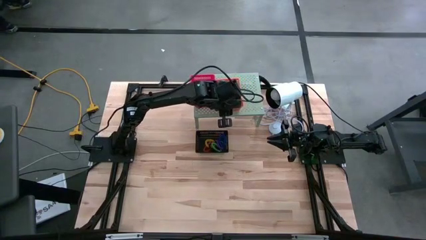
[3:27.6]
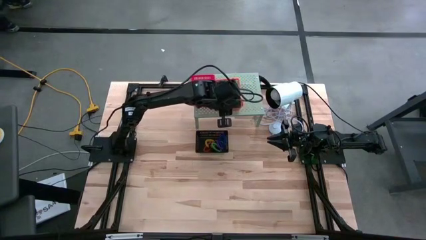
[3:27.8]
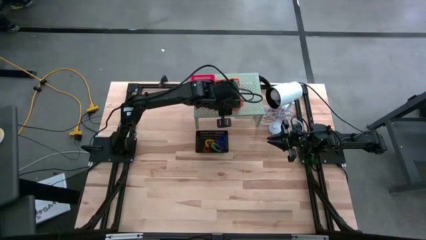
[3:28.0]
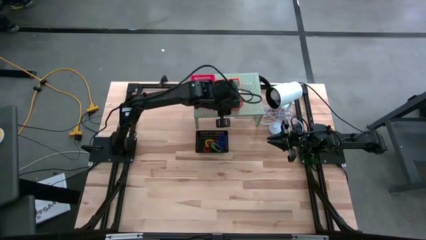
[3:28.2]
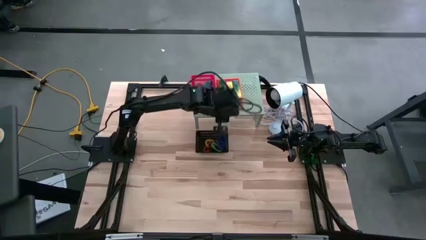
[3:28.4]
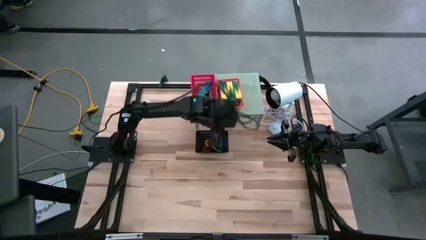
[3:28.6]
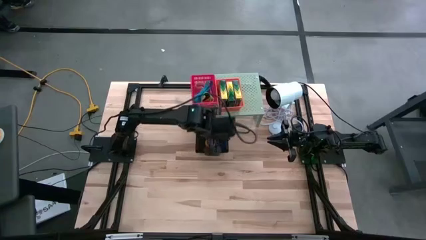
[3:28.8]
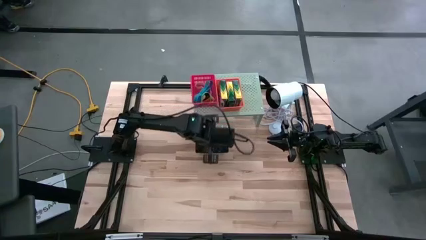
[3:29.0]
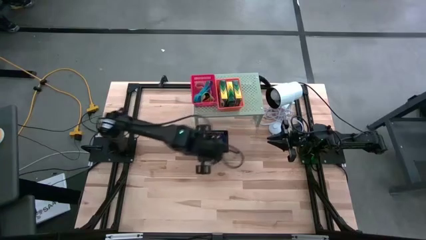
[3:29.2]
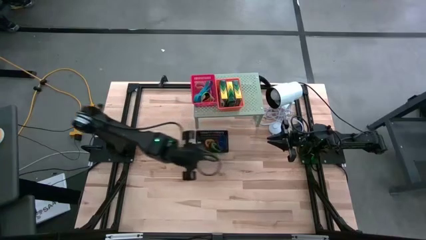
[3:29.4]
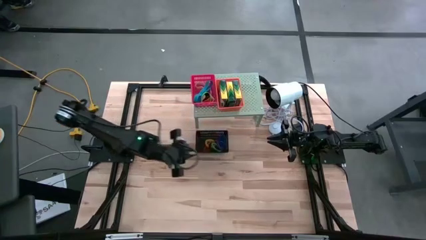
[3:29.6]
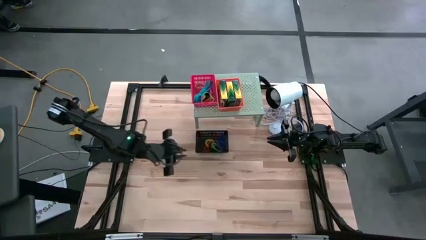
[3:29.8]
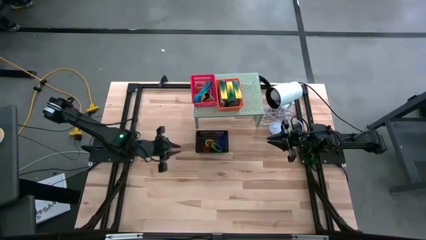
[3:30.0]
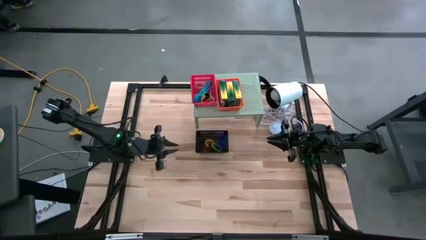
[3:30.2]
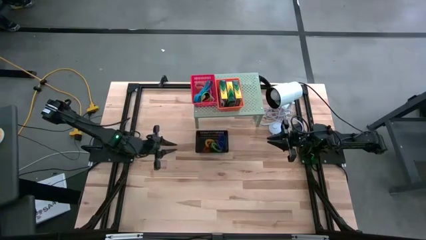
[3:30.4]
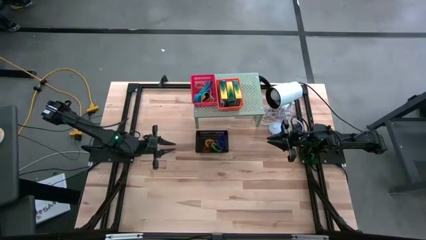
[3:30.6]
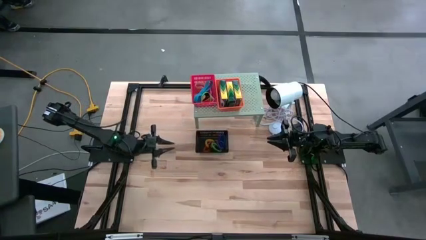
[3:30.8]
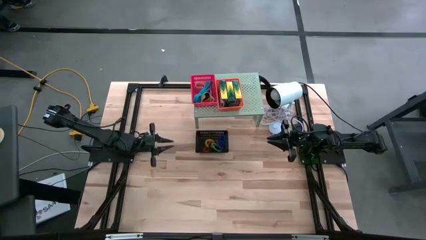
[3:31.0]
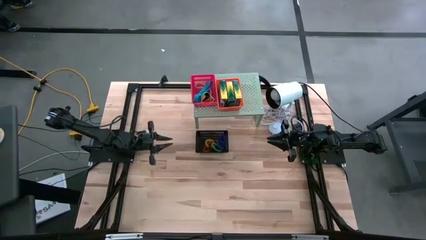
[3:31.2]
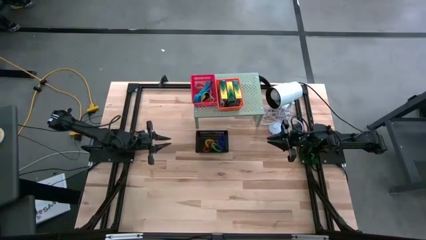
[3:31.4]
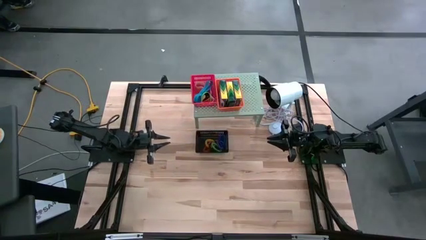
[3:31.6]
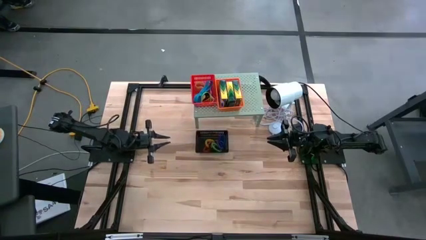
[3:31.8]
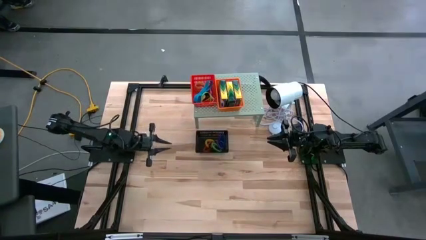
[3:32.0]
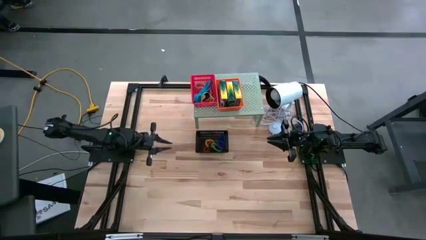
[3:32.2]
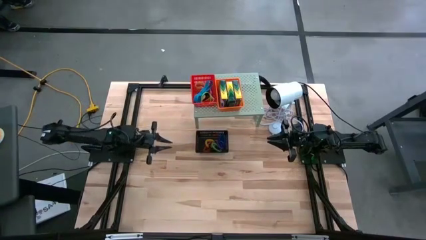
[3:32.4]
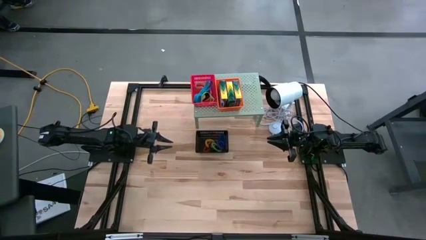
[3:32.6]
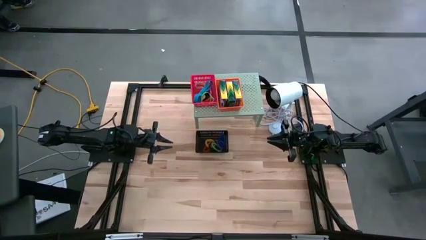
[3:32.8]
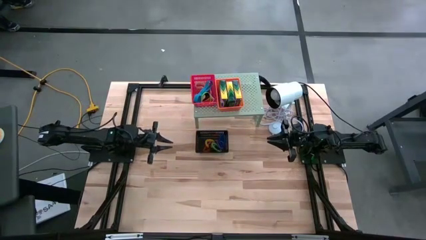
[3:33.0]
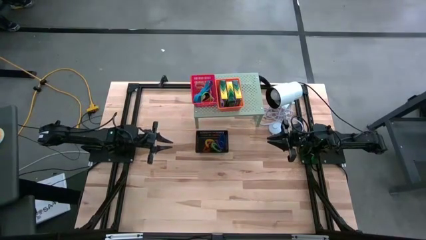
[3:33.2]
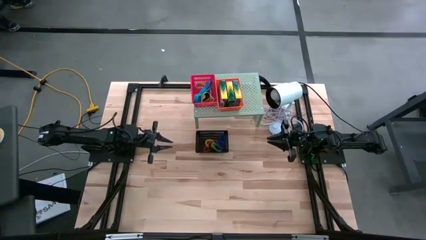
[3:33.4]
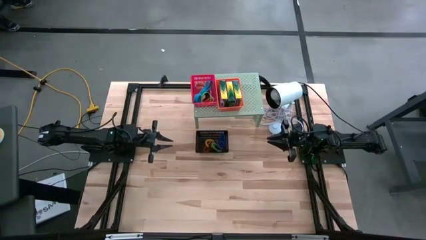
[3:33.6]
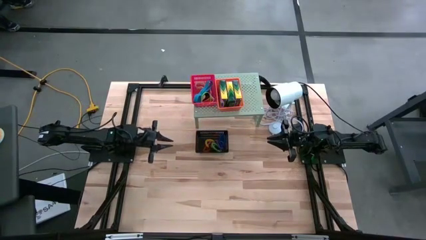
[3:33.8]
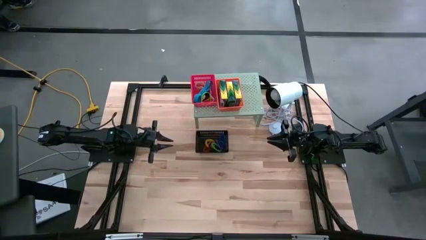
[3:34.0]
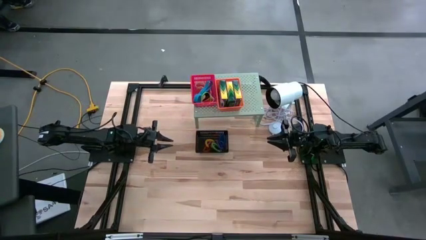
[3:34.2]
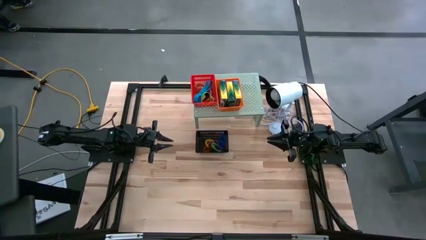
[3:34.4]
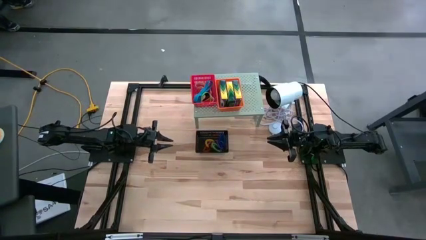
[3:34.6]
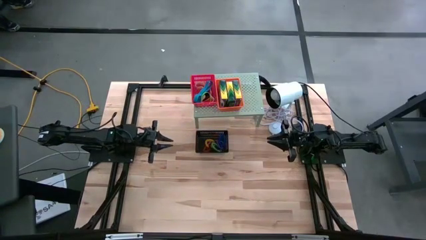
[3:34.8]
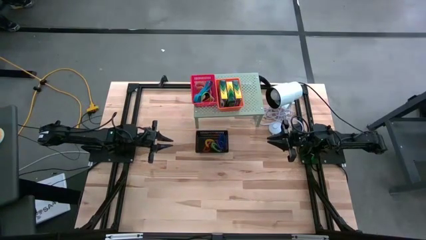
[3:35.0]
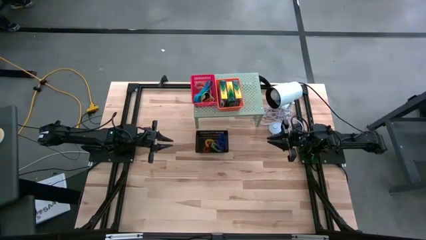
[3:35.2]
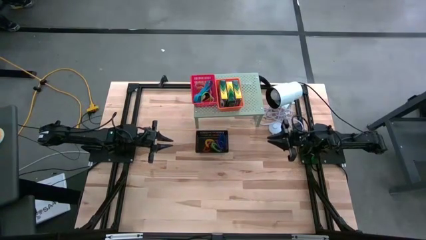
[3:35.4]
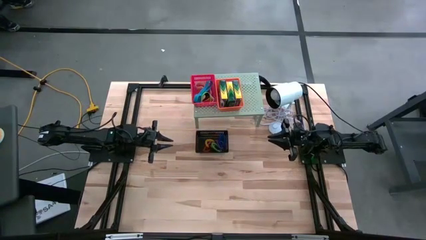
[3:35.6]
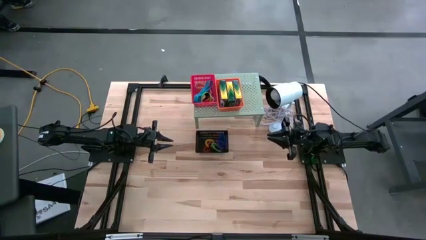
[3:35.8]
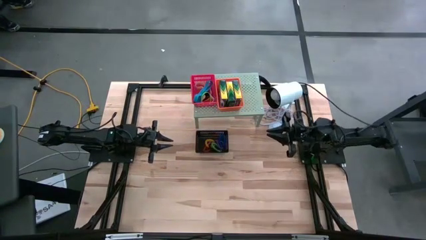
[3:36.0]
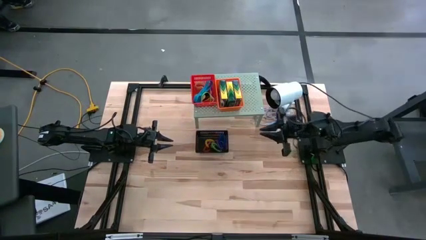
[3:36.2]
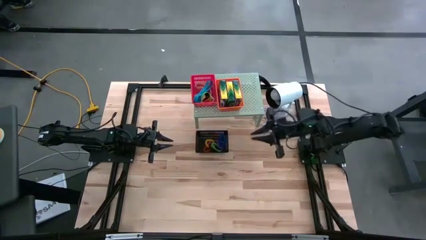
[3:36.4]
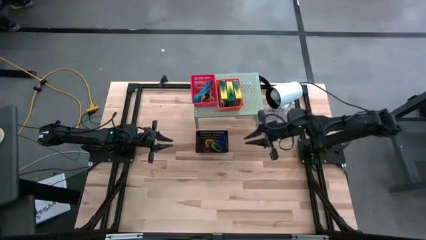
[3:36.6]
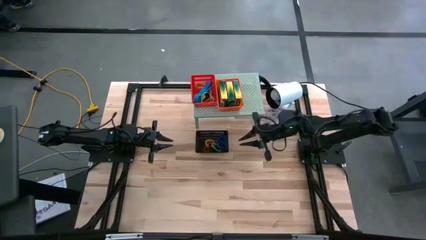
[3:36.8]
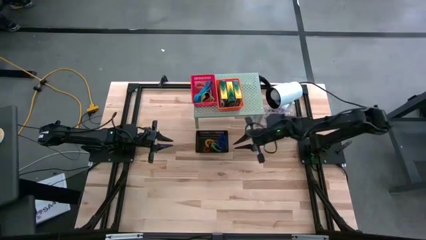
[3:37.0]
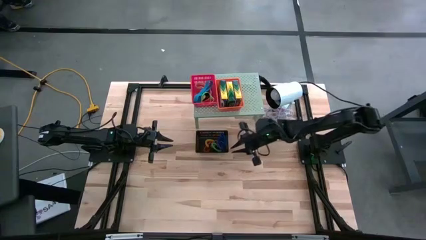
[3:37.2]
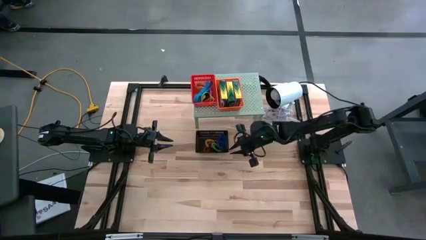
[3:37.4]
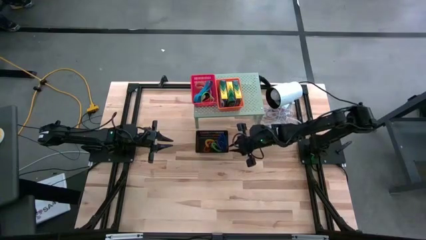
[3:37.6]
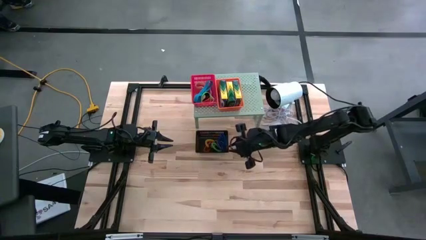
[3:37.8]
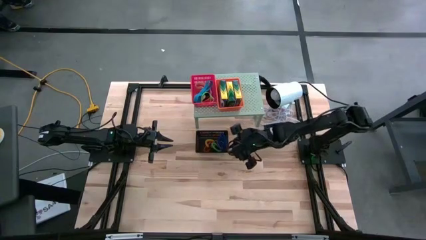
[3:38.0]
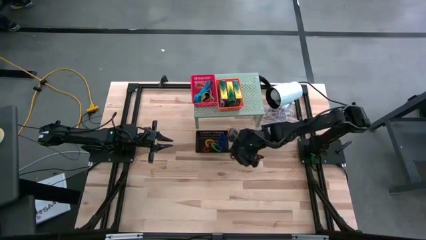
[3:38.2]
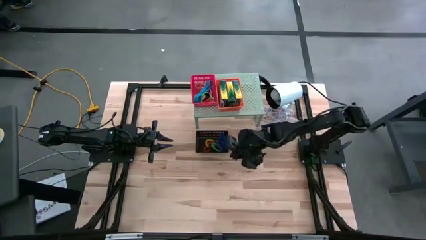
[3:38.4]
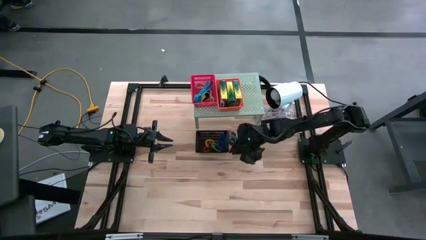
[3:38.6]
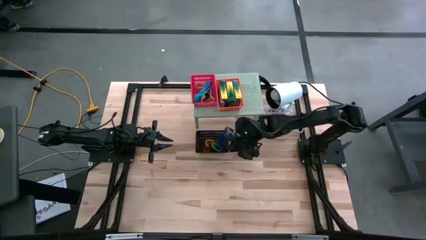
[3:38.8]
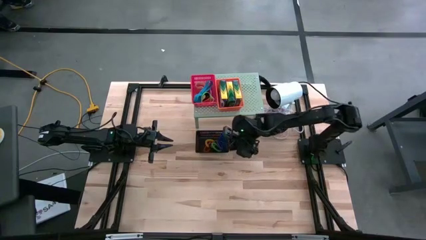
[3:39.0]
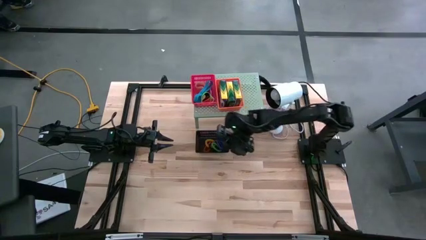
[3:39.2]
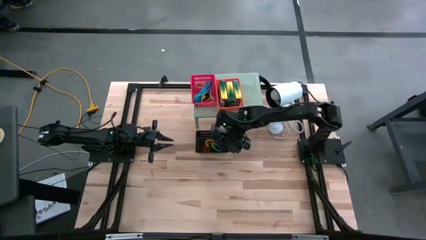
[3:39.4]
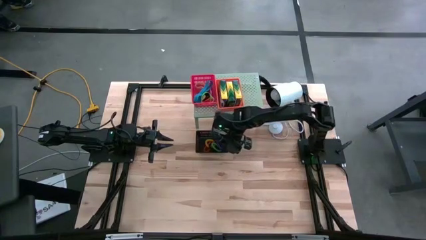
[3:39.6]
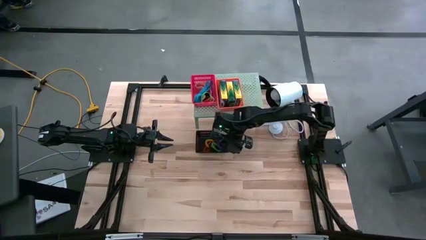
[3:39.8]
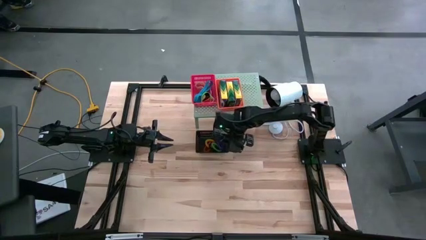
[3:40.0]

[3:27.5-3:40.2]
Task: Pick & Place Office Desk Supplies
Put the black bin with the spring rubber bands on the shelf

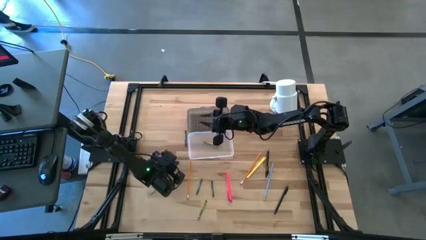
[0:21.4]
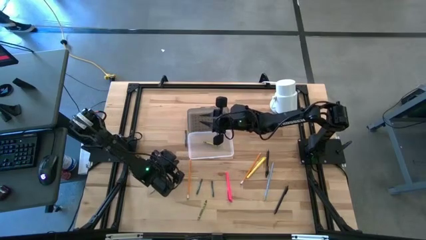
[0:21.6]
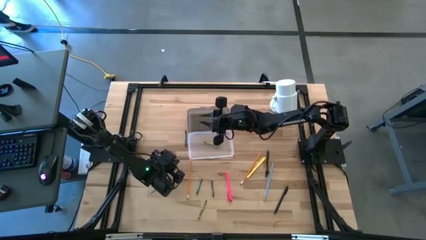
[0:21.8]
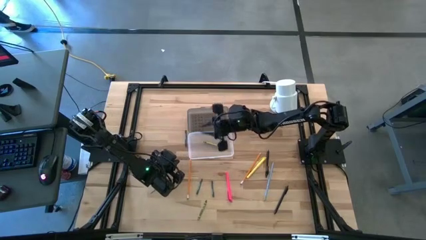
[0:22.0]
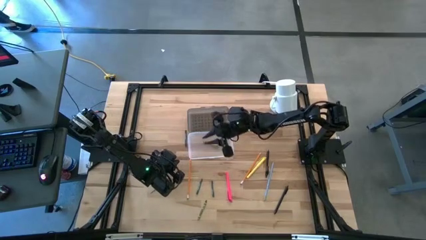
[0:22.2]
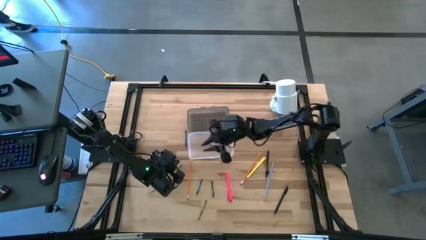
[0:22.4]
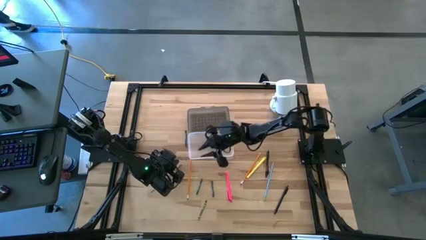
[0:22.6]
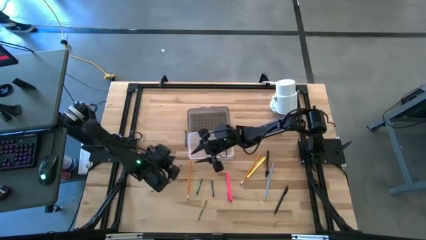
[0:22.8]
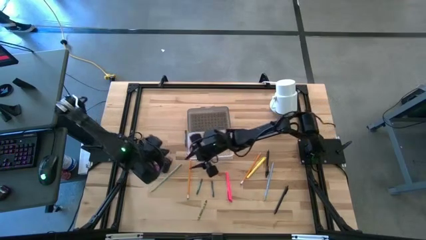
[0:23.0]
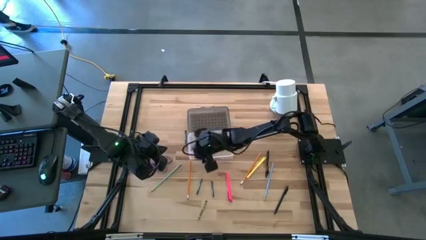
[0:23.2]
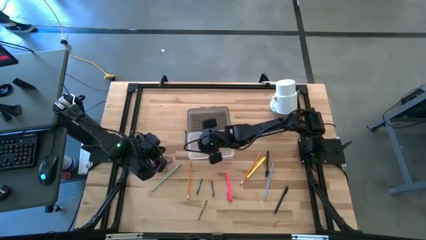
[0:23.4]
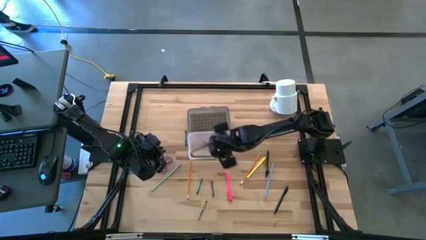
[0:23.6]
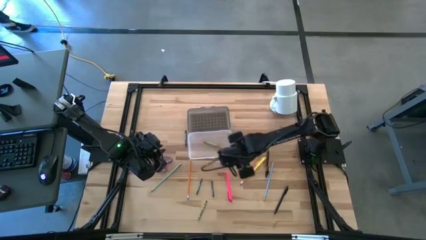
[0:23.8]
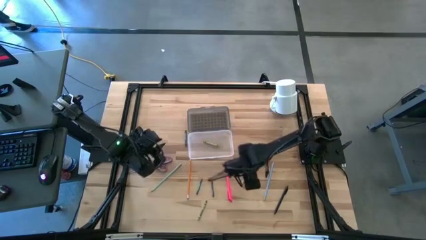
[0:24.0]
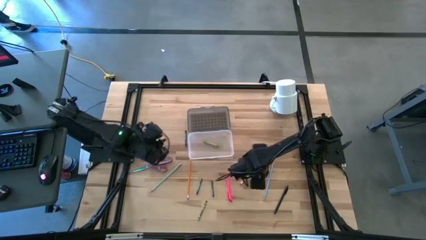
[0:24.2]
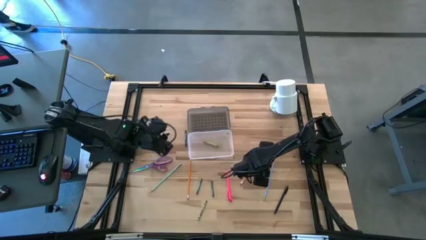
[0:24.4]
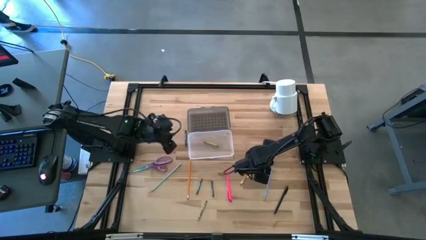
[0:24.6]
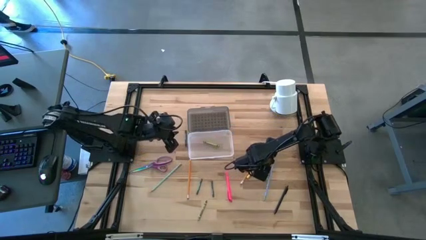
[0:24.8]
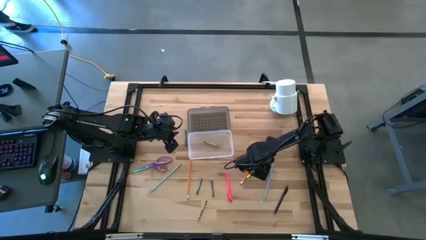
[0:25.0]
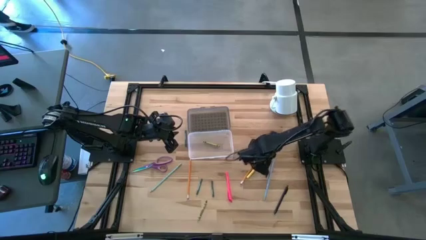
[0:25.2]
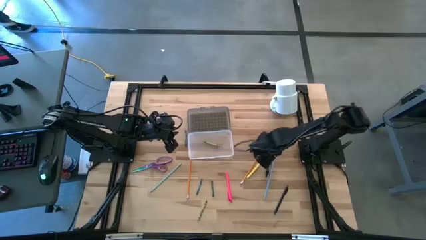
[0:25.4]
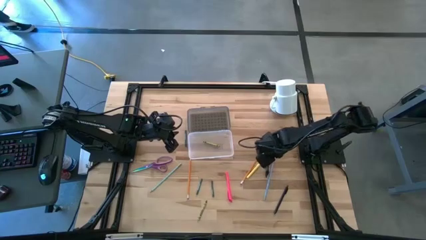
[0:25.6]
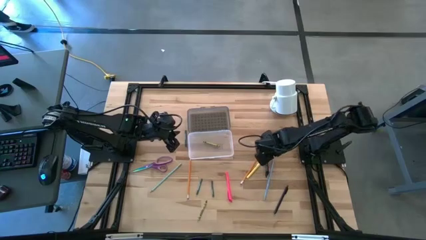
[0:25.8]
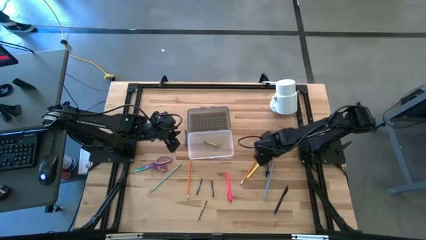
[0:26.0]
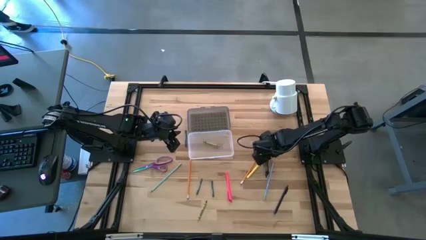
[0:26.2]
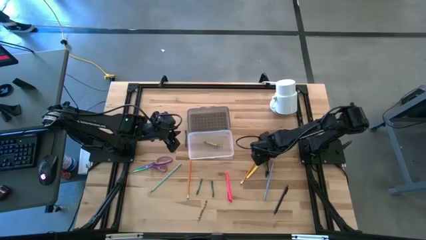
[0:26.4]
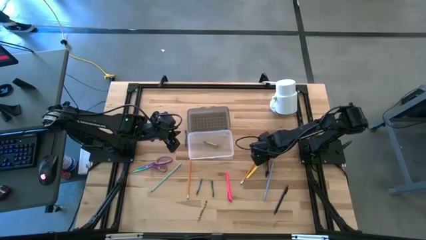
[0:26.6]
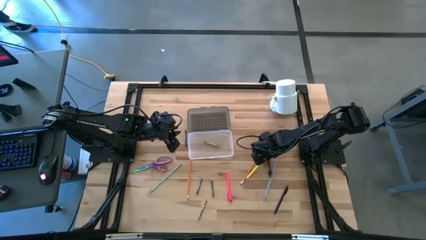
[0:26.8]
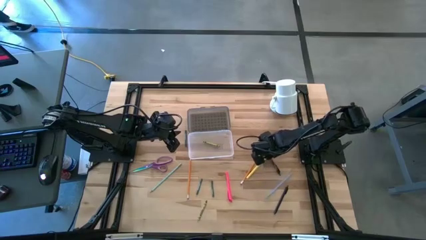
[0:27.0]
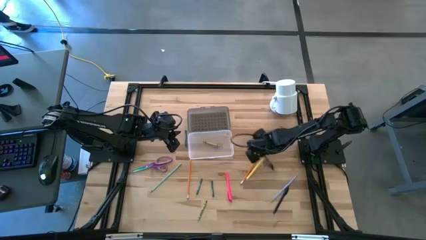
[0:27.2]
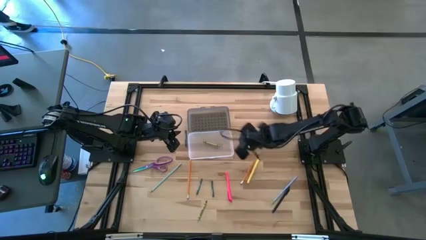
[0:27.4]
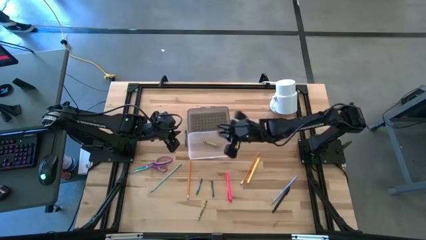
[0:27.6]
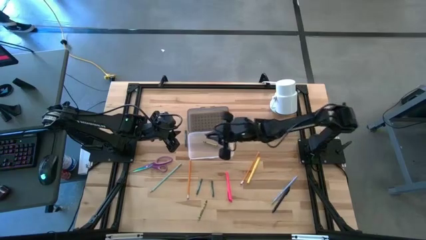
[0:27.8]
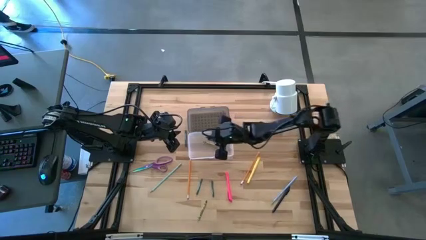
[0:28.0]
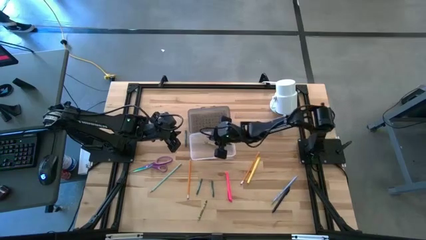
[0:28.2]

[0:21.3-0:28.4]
Task: Pick & place school supplies into a supply box
Put the left black pen into the gray supply box
